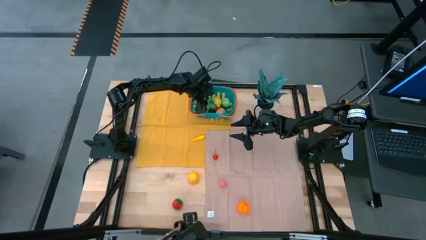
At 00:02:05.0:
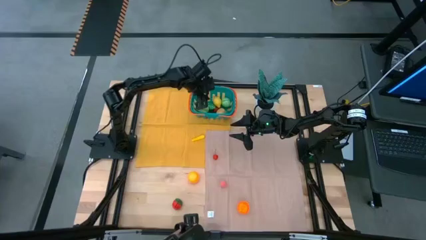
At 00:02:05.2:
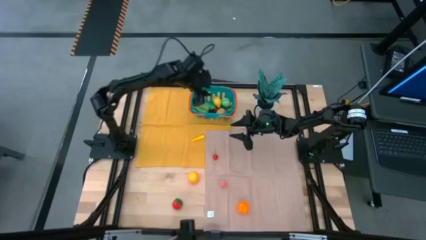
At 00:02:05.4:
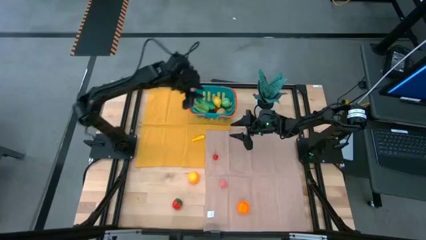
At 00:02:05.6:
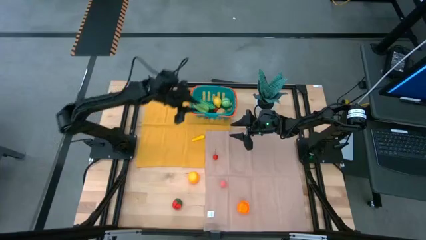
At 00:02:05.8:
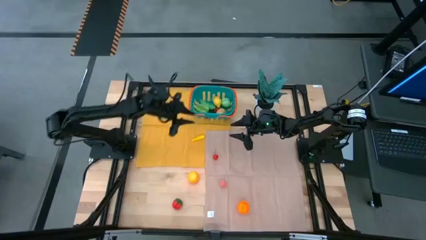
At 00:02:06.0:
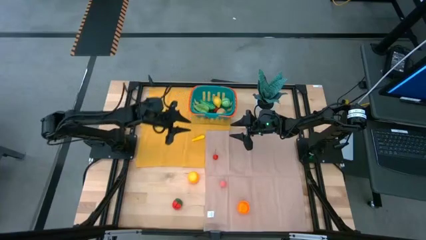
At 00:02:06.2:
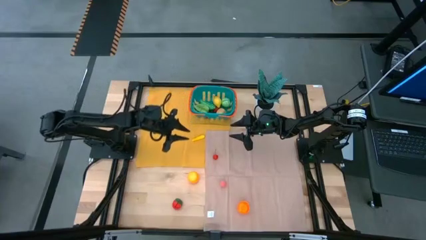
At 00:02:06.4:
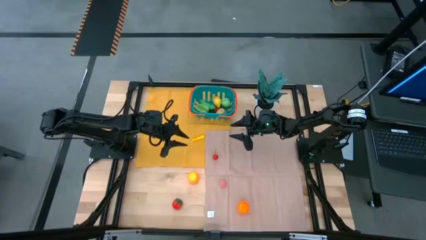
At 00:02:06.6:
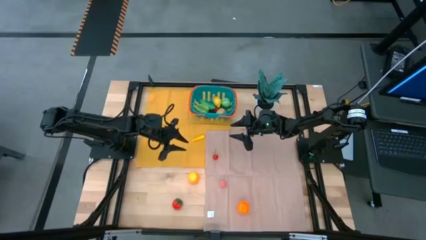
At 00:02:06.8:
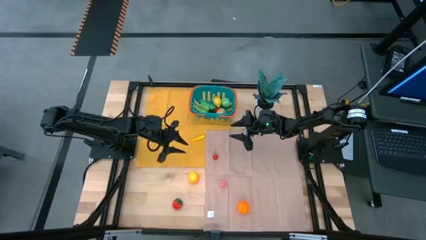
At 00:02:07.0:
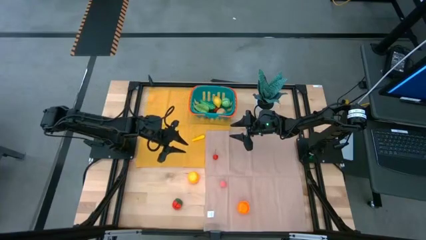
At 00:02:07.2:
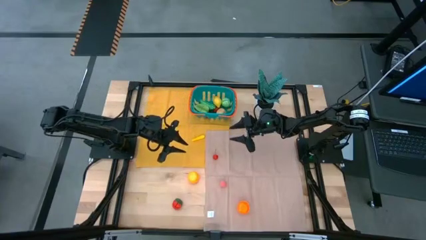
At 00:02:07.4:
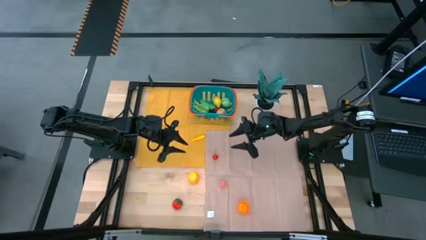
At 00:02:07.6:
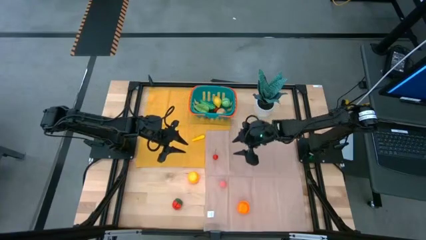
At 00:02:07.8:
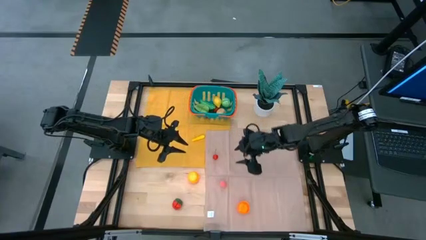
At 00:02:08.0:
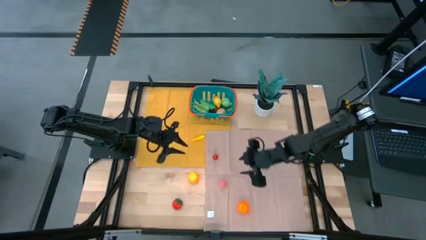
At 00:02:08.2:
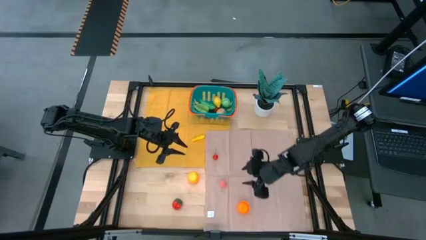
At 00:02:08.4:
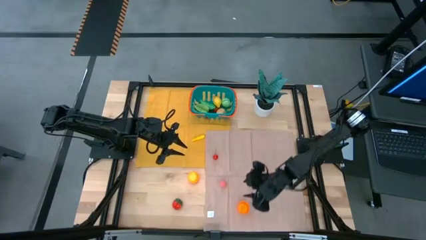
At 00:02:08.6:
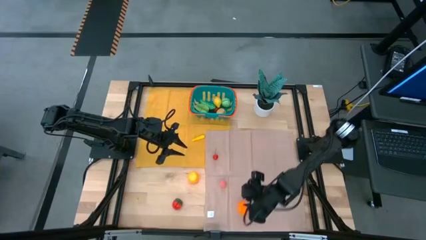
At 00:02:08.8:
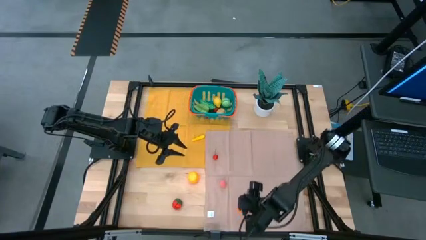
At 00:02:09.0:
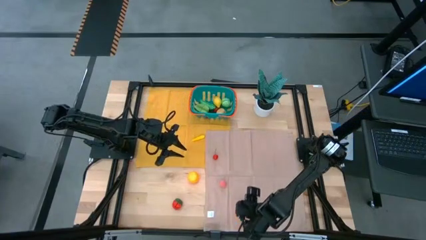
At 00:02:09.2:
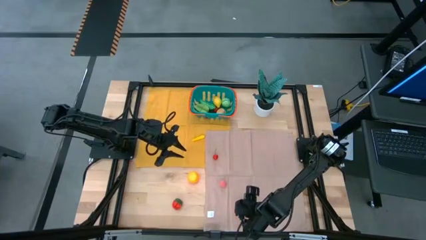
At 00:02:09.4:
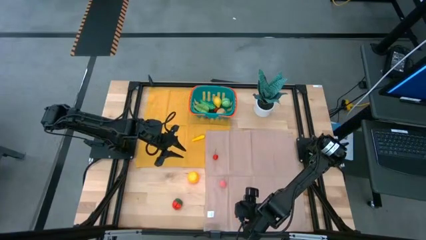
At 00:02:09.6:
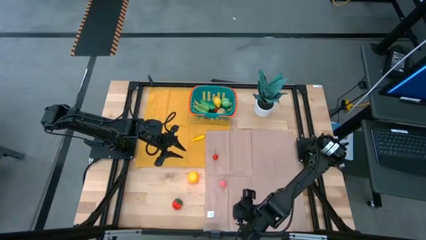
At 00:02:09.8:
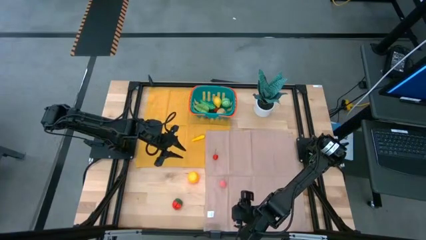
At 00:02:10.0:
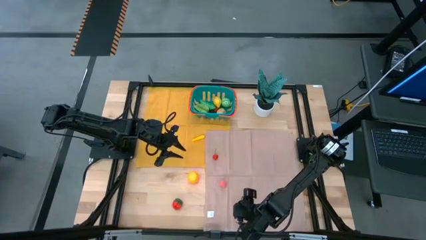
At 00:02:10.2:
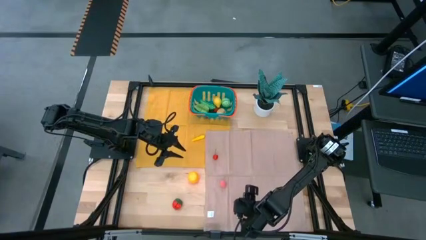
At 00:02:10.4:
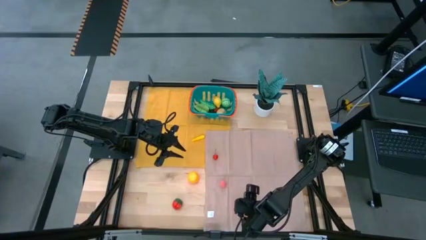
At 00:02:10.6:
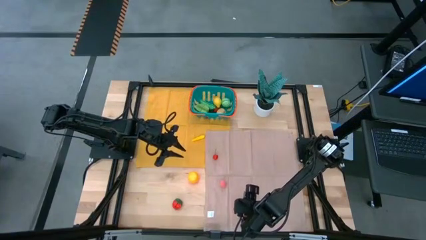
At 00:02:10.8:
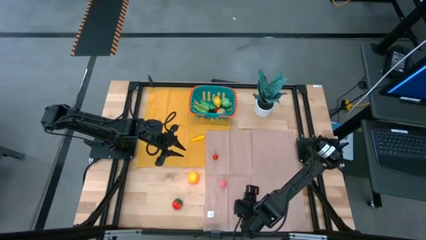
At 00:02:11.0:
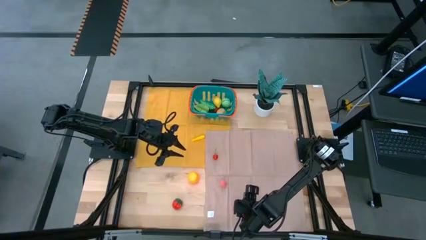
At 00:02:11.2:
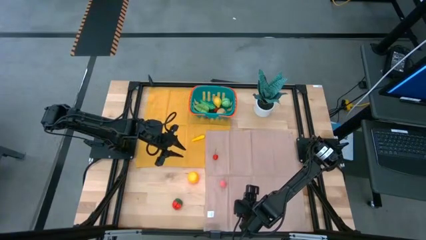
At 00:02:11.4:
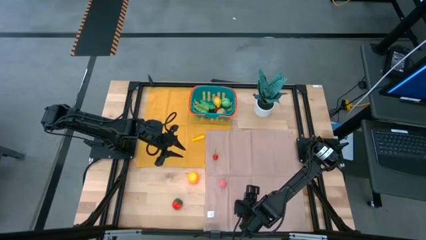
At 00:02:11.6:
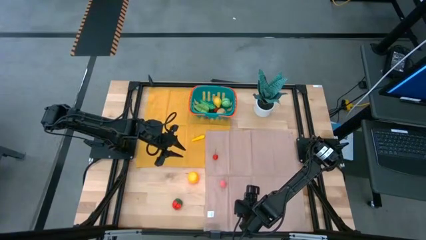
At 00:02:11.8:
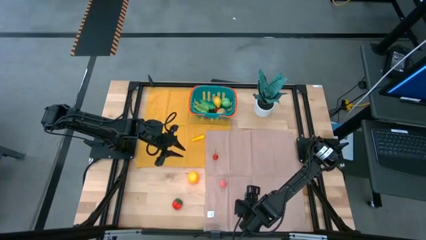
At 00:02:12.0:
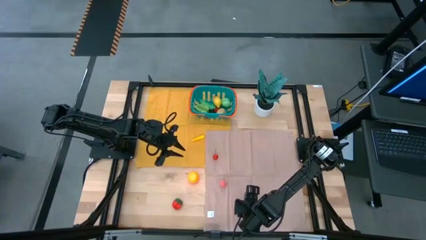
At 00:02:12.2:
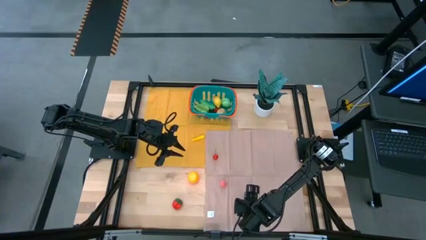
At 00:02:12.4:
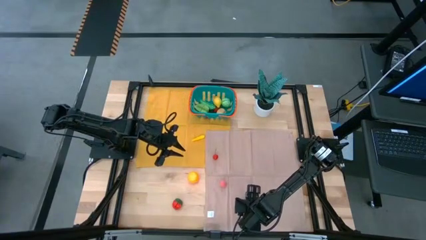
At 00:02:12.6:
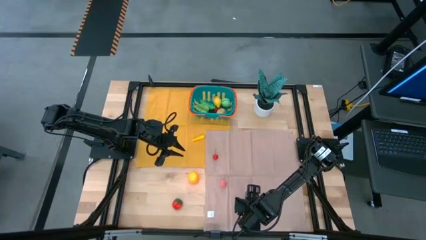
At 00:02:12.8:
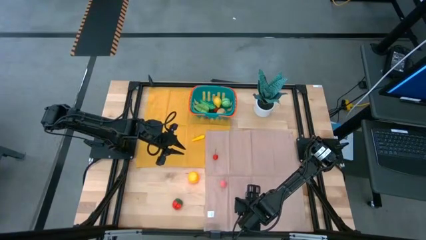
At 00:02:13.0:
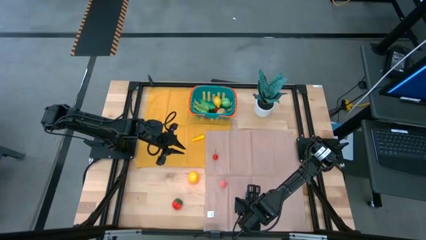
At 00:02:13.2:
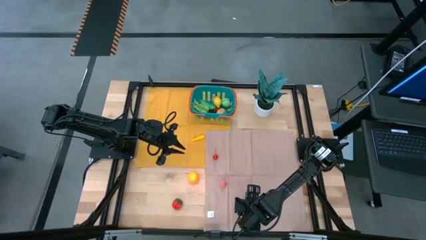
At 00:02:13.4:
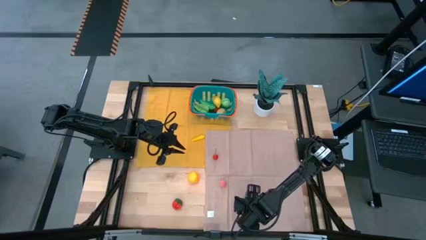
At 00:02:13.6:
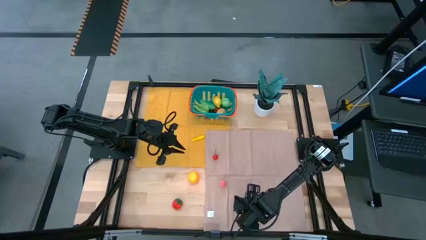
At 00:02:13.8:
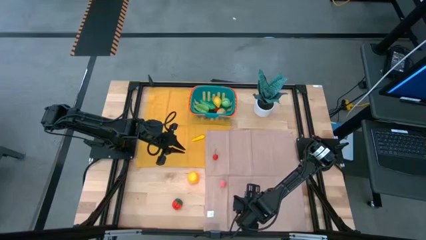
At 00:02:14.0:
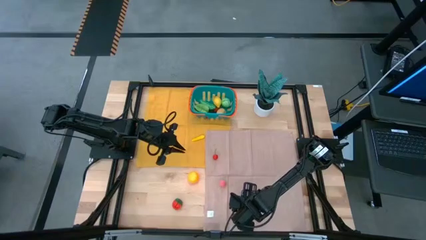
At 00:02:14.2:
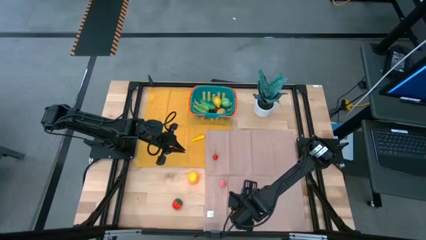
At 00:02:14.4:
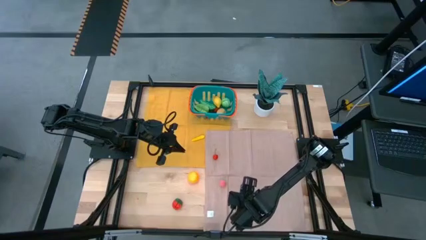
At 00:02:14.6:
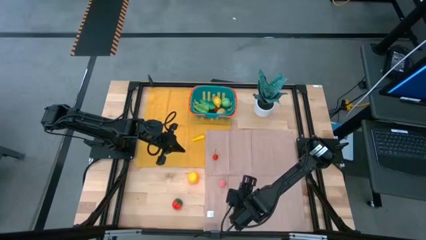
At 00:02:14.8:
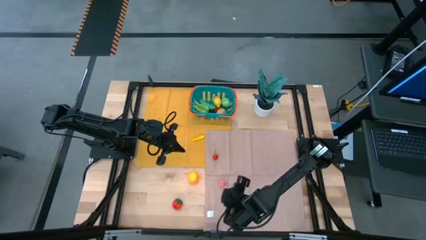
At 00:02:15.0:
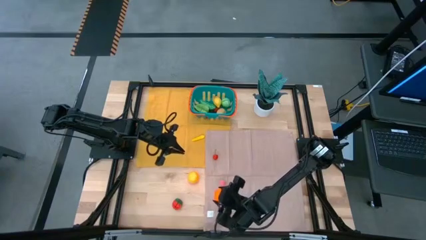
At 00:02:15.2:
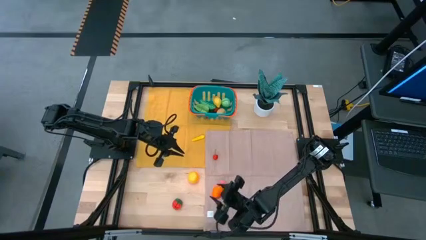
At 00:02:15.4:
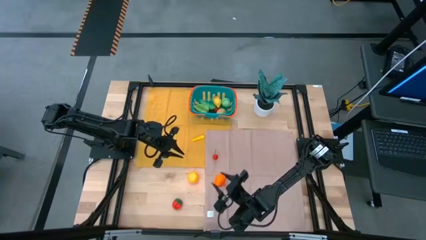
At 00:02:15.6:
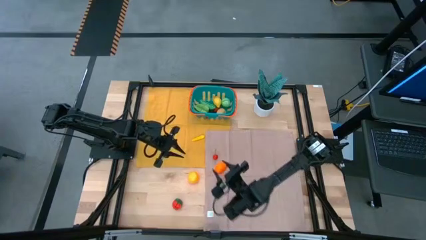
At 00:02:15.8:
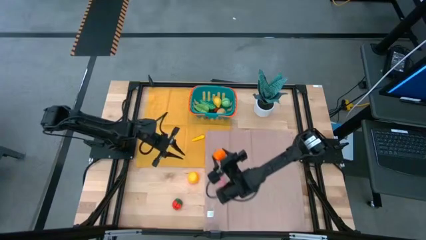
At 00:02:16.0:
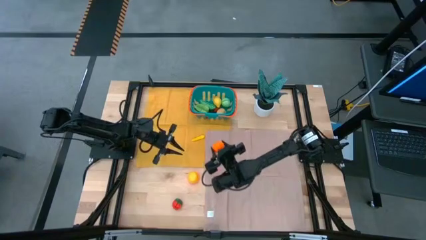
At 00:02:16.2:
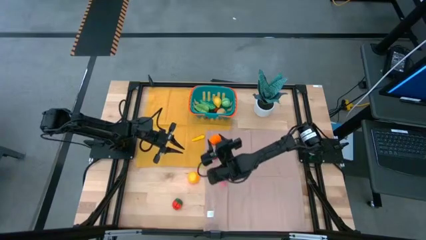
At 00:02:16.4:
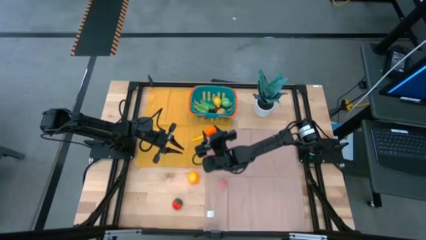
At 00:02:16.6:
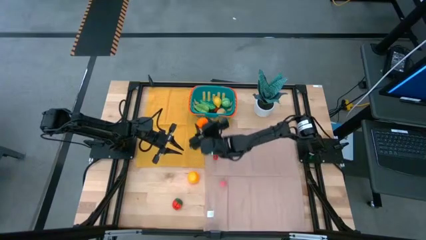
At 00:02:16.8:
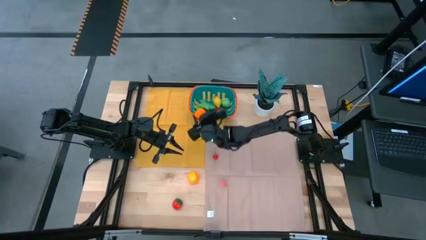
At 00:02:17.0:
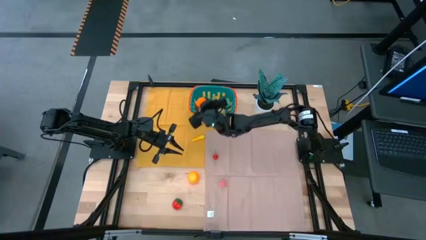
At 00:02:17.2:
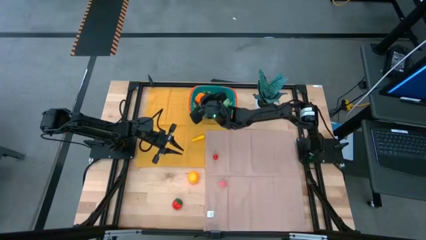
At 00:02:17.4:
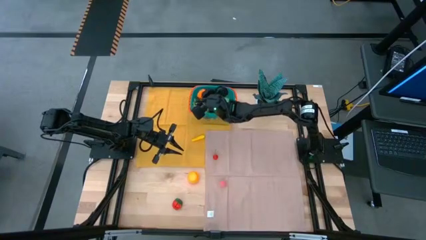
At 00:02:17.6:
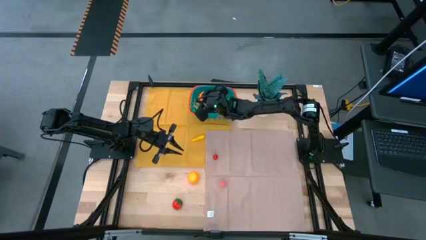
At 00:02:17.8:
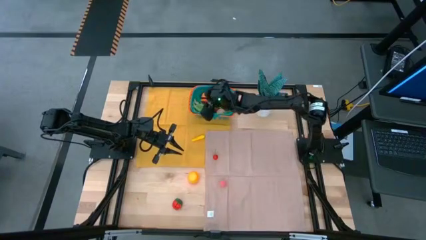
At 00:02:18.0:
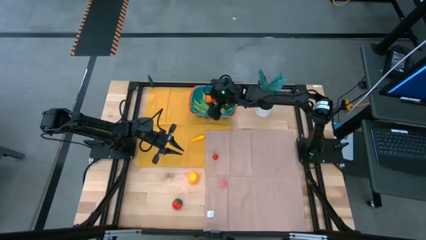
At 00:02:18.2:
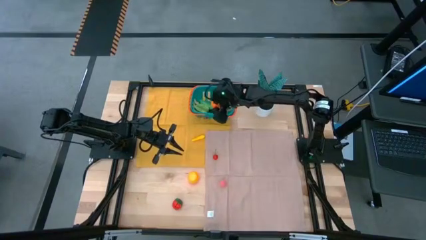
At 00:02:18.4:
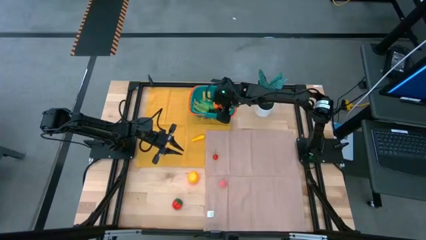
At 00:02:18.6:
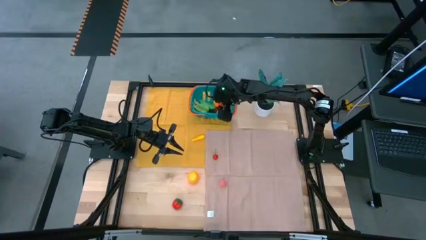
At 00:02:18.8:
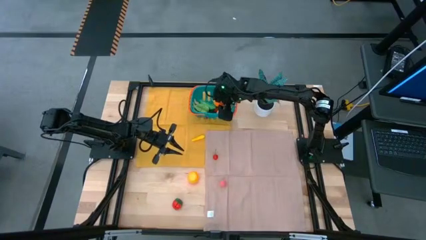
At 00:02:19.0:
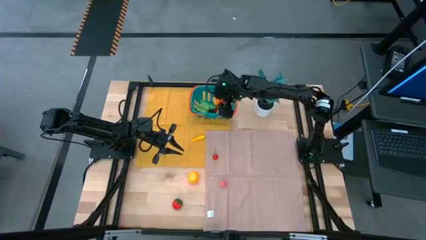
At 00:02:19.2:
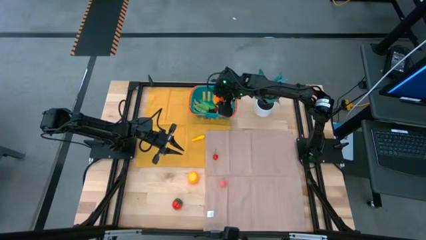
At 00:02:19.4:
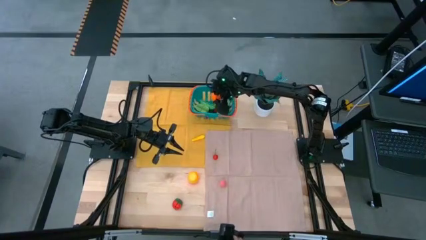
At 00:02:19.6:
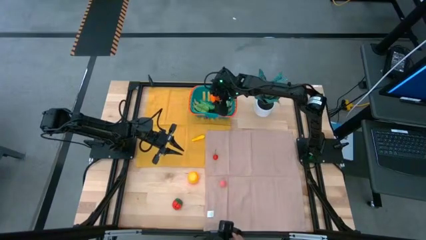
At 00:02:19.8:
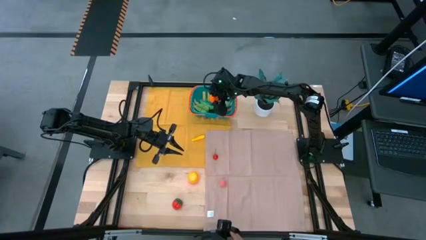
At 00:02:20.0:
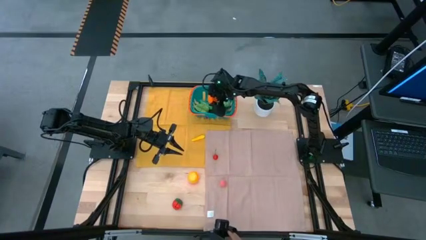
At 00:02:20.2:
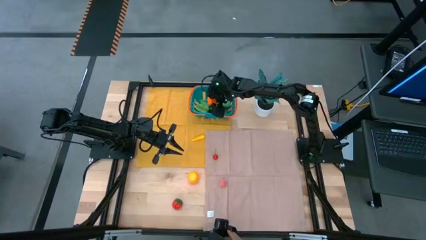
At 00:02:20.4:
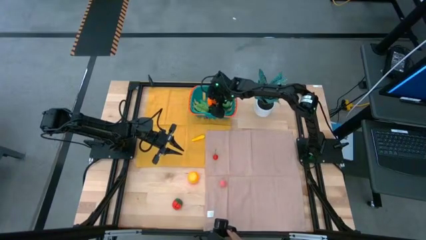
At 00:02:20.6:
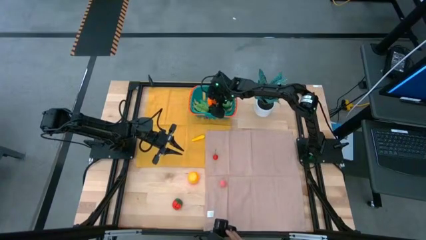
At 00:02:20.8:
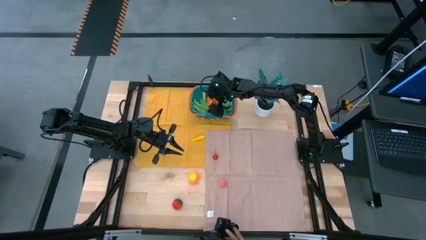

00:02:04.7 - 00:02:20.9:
Task: Pick and placing Produce into tupperware
Put the orange pumpkin into the blue basket
